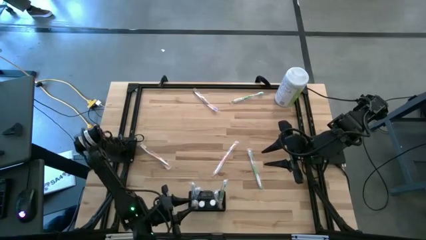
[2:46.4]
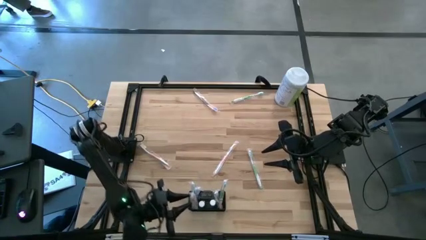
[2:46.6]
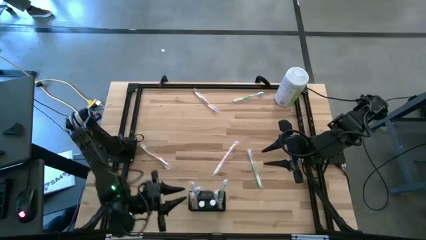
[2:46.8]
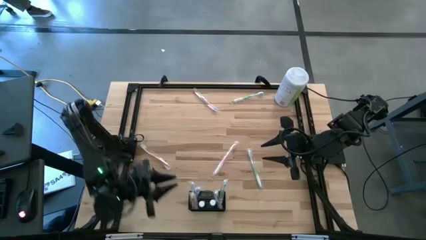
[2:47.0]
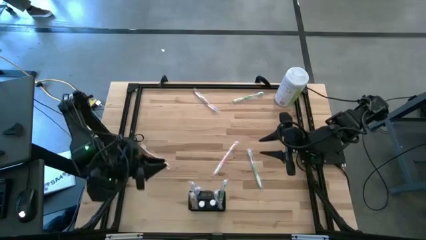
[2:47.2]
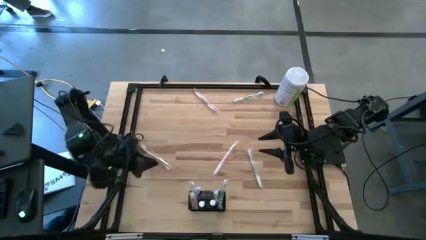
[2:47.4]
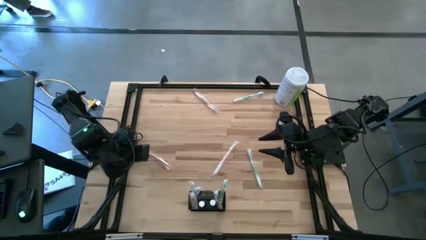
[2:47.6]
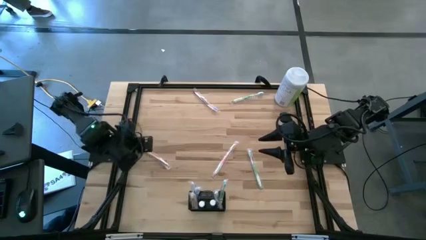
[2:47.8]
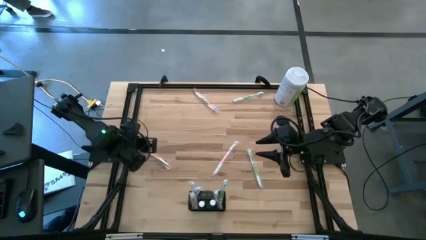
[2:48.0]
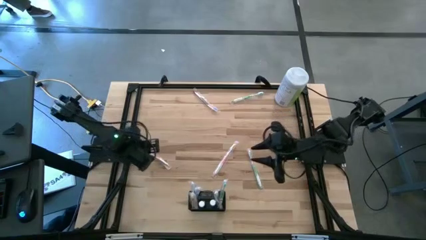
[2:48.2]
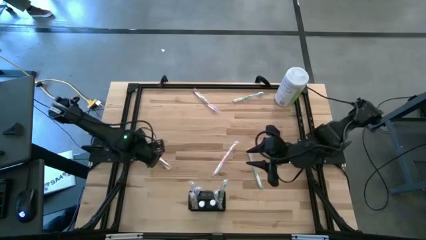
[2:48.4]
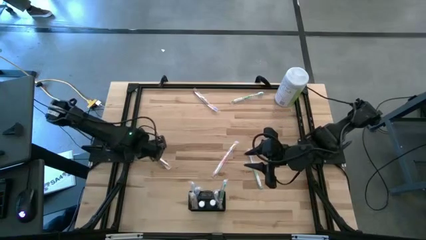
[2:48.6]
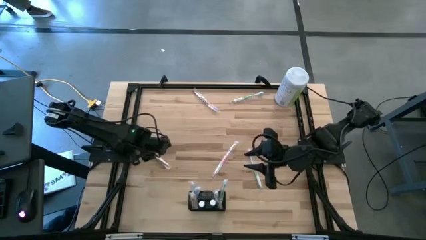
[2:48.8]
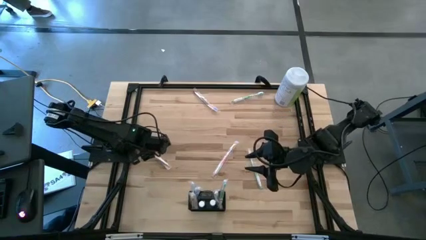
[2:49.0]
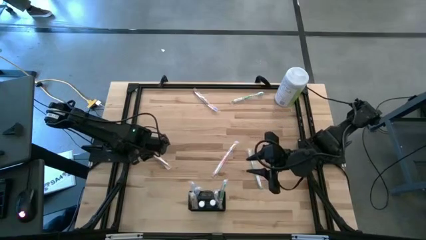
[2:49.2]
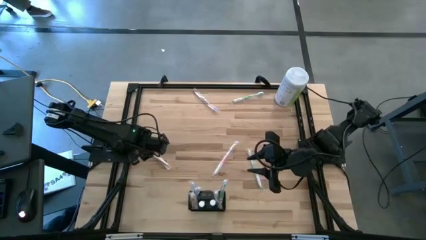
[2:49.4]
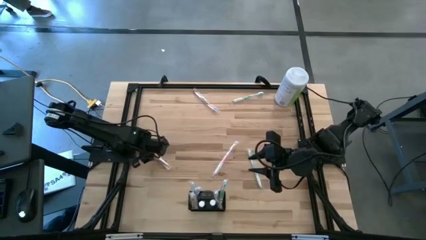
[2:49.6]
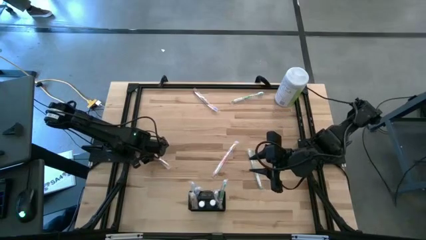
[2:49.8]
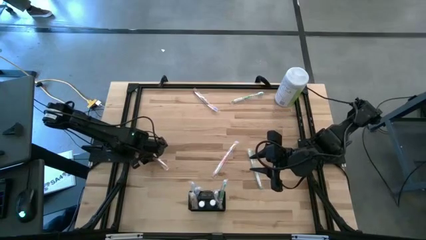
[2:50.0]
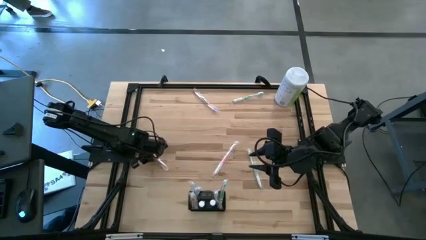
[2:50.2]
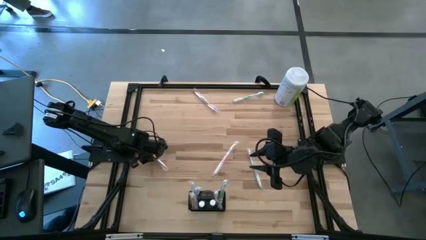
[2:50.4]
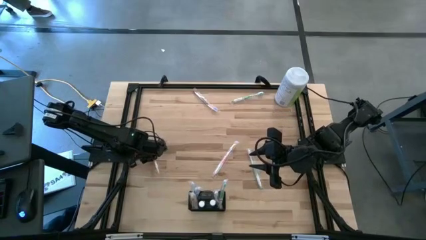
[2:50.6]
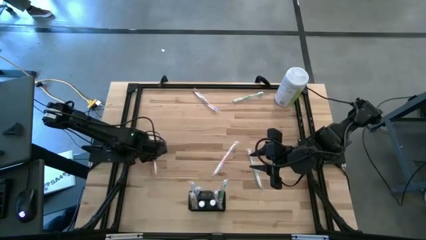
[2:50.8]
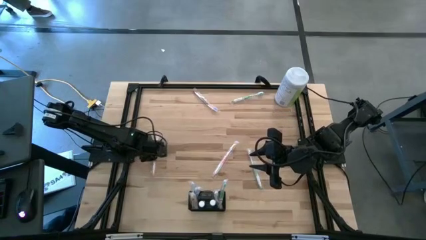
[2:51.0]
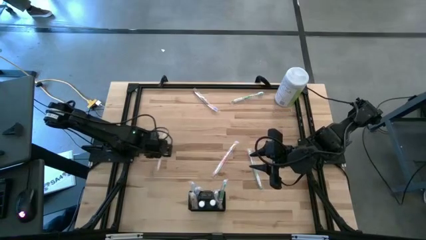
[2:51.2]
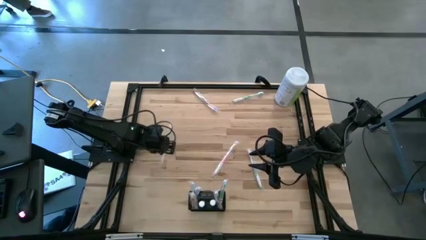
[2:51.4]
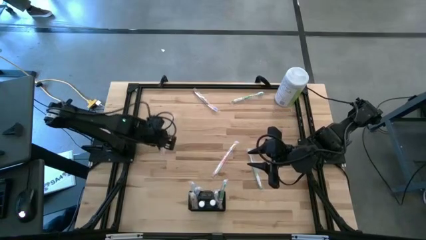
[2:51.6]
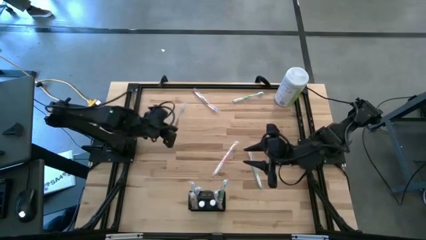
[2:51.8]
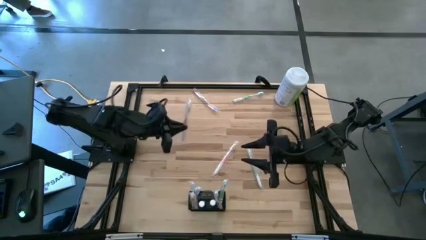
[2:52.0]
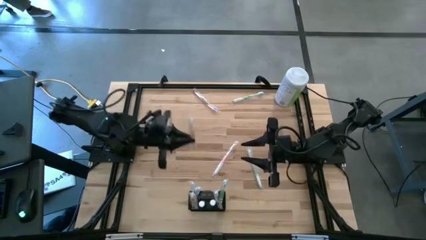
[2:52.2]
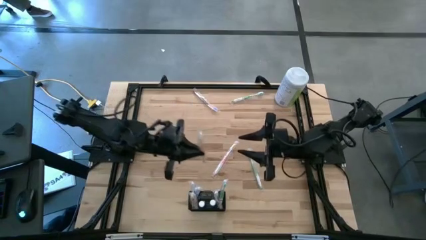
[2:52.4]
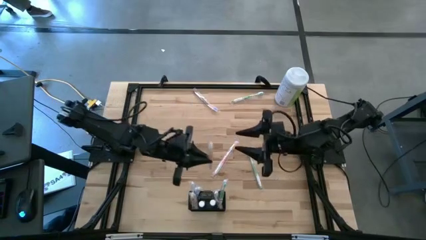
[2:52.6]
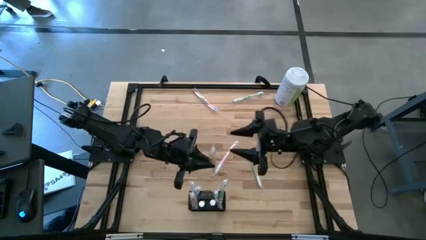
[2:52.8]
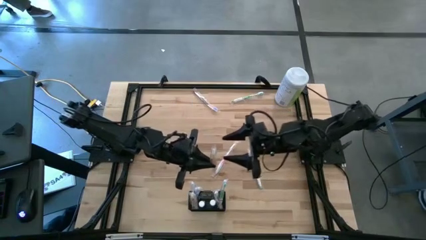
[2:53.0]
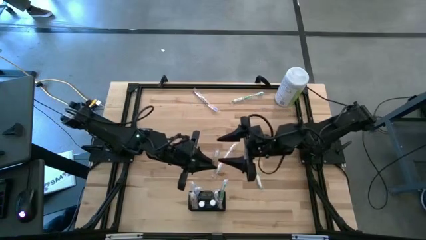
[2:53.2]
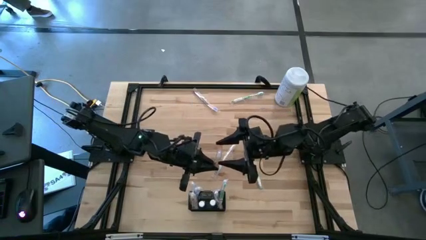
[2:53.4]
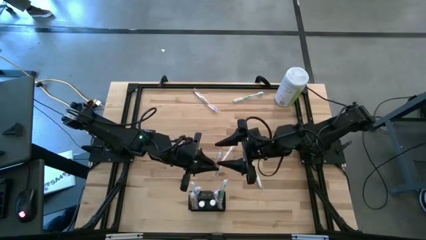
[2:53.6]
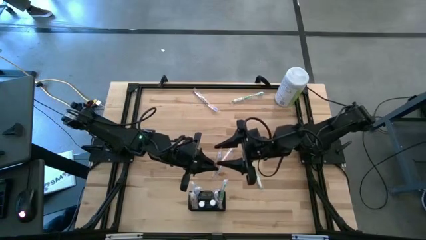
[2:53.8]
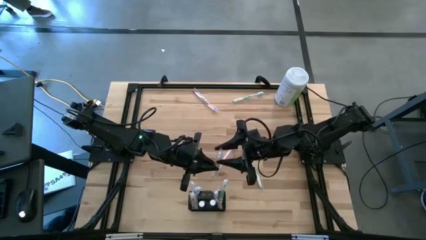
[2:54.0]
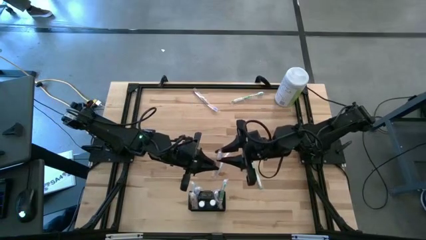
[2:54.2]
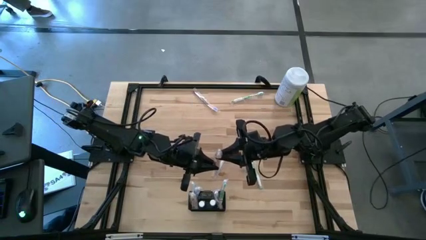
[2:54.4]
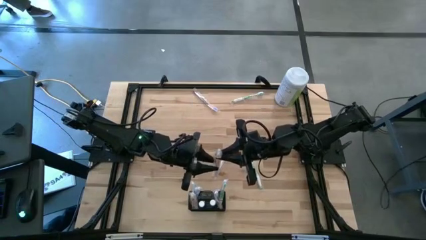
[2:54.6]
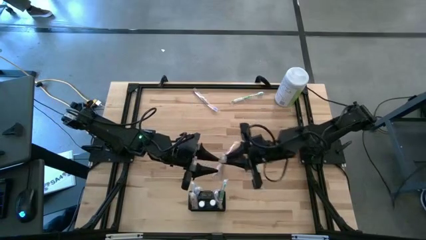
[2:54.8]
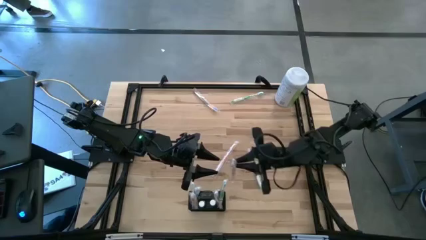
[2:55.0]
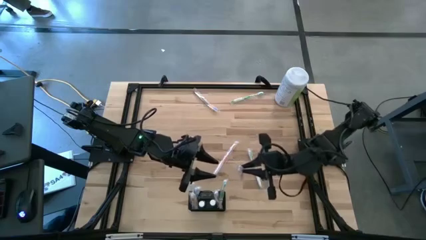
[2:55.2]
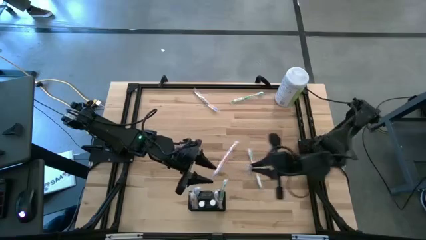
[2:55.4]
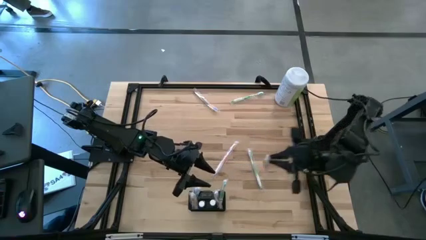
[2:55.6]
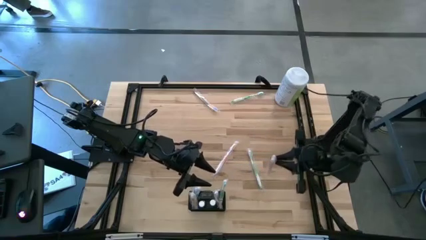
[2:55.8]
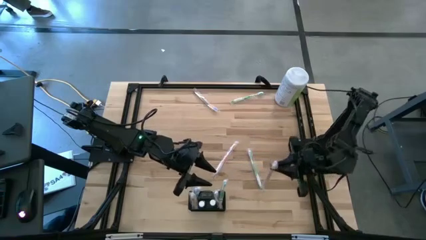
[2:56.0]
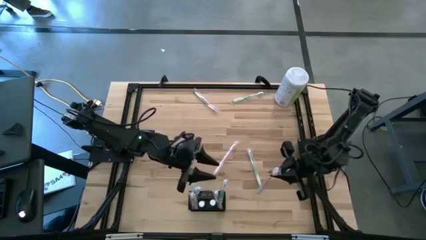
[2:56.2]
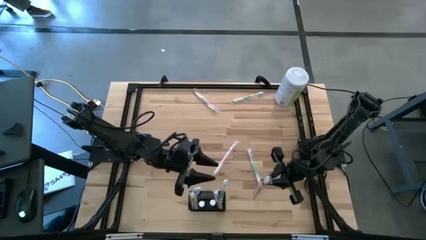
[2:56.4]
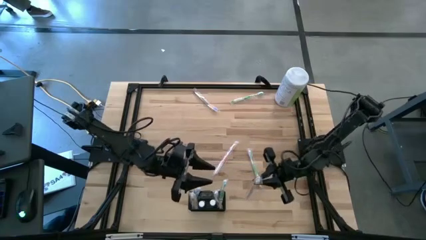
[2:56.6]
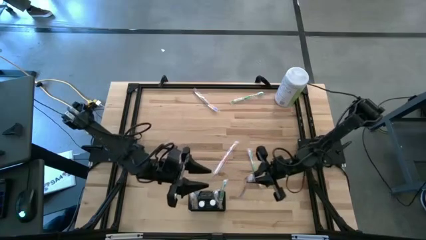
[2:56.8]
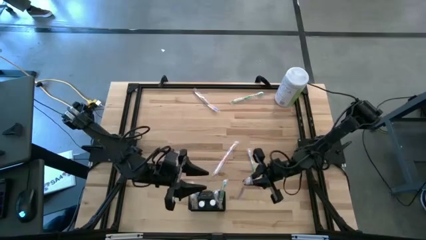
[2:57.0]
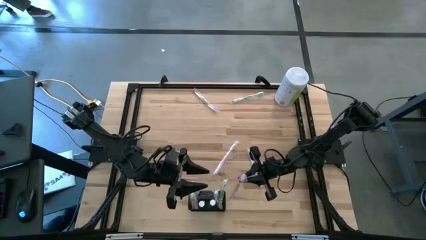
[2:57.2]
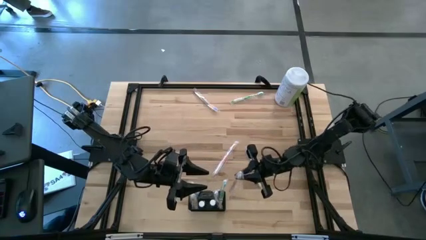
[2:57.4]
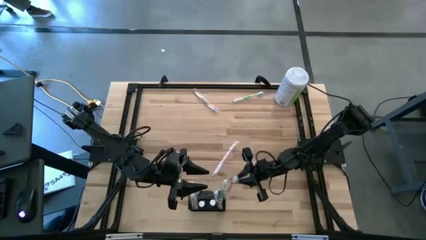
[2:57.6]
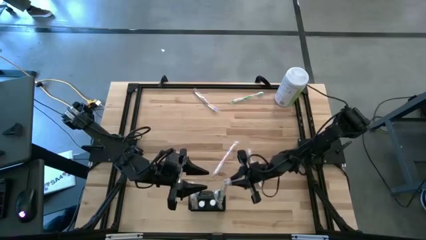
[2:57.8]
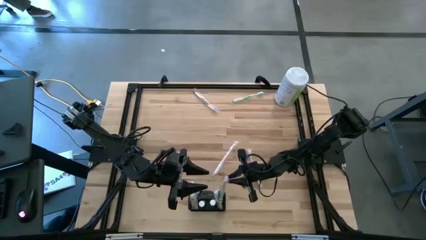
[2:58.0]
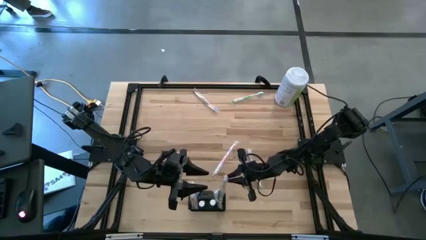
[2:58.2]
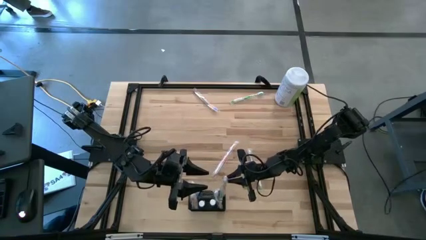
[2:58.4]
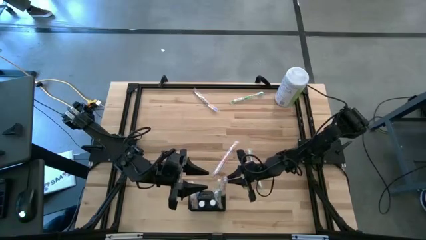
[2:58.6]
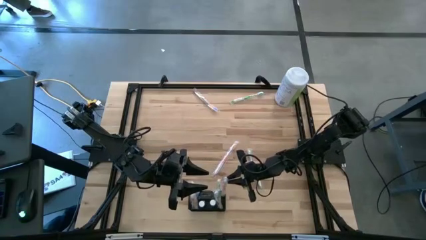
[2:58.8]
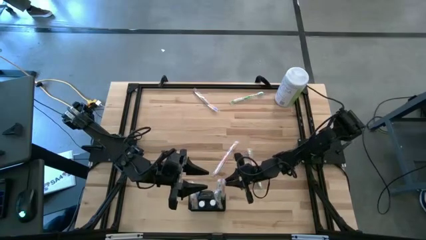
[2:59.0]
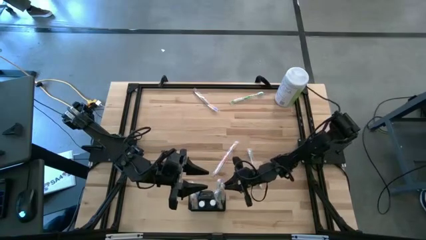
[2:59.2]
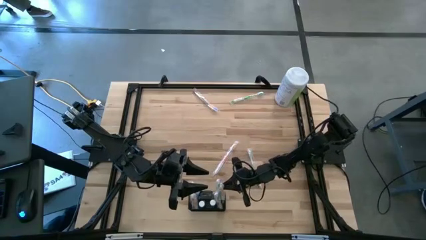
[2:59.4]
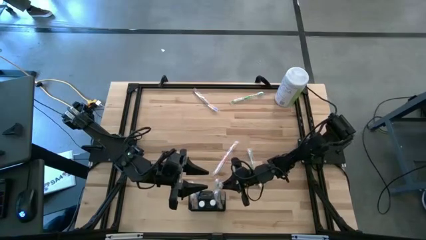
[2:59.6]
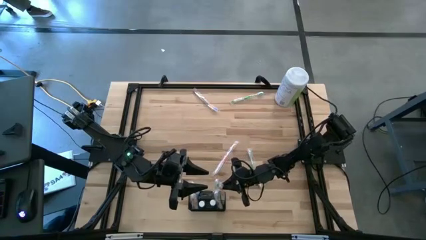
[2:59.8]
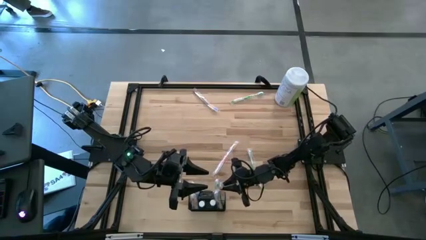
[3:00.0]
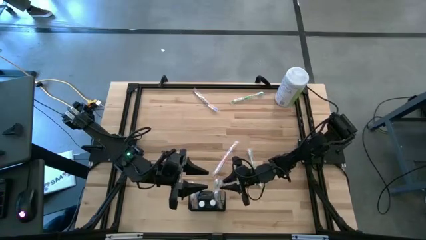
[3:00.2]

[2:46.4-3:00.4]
Task: Pick & Place toothbrushing station
Put the left orange toothbrush into the black wire organizer

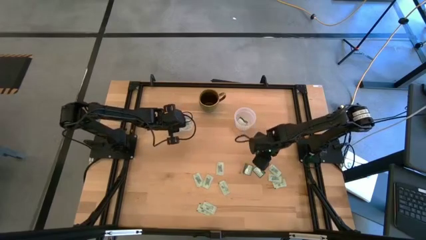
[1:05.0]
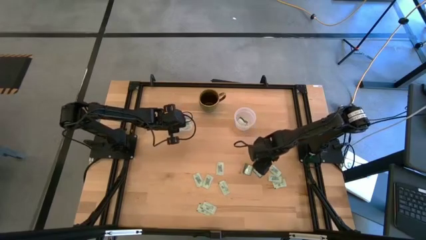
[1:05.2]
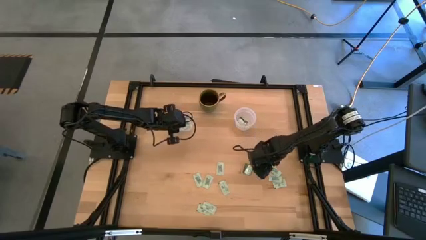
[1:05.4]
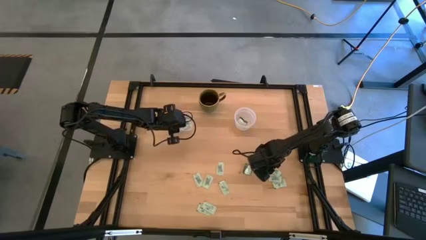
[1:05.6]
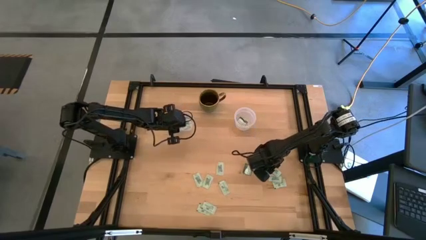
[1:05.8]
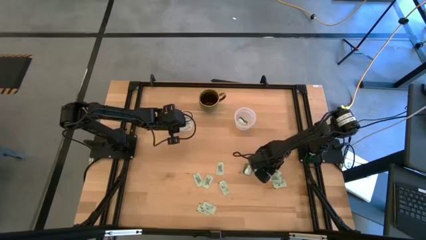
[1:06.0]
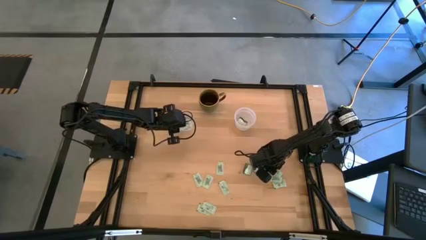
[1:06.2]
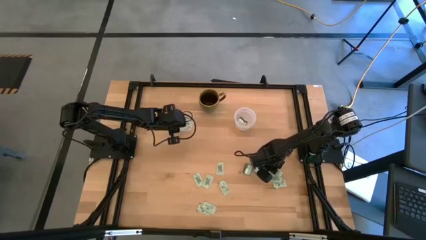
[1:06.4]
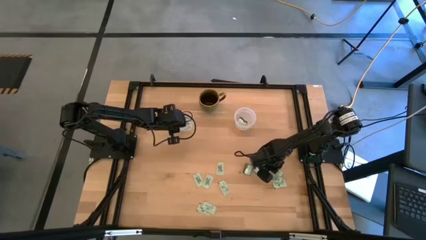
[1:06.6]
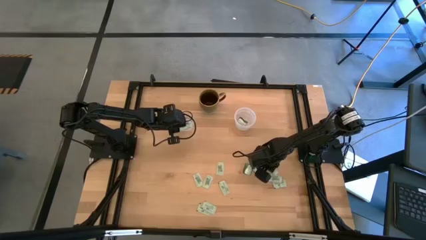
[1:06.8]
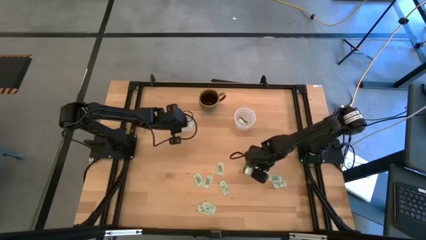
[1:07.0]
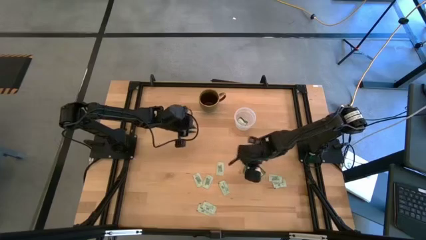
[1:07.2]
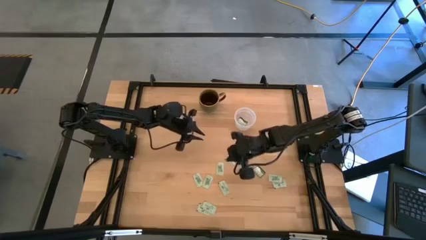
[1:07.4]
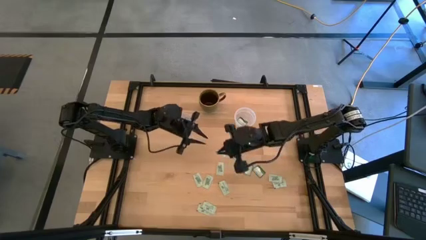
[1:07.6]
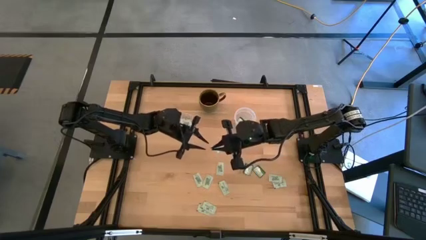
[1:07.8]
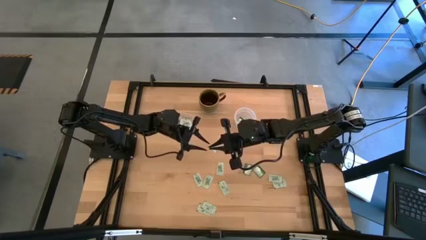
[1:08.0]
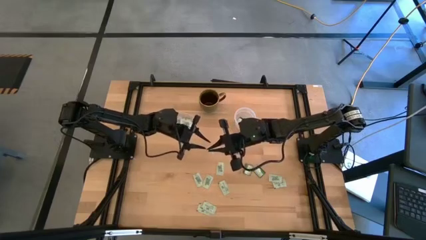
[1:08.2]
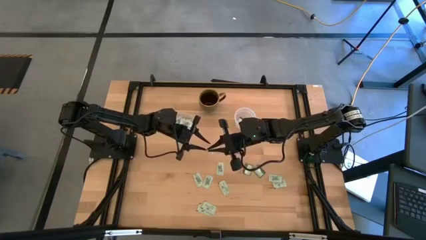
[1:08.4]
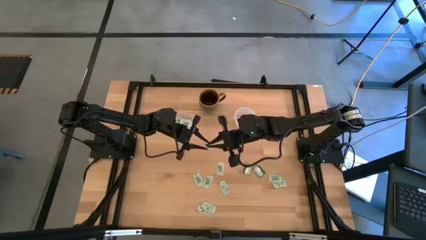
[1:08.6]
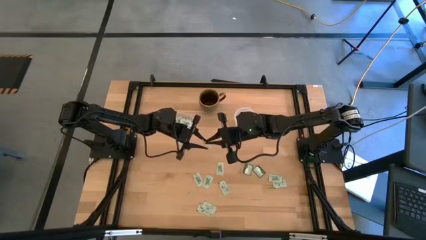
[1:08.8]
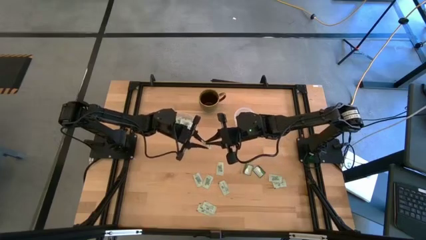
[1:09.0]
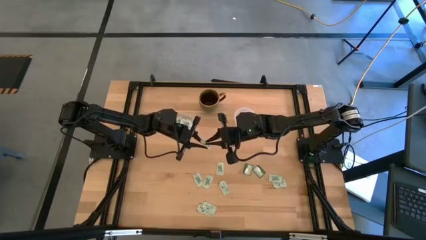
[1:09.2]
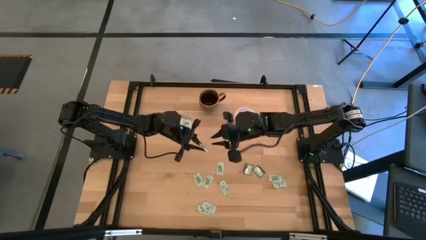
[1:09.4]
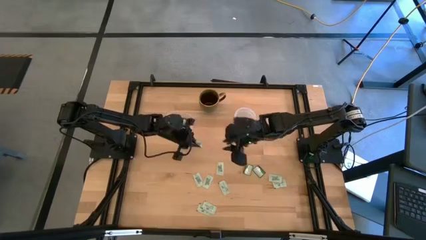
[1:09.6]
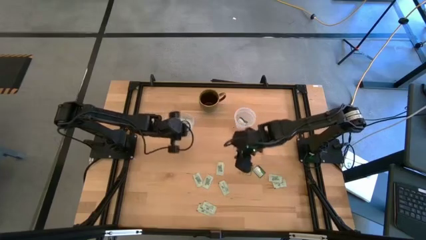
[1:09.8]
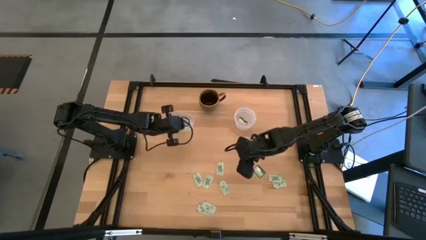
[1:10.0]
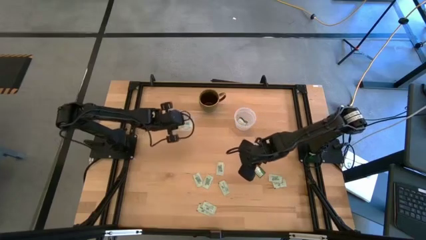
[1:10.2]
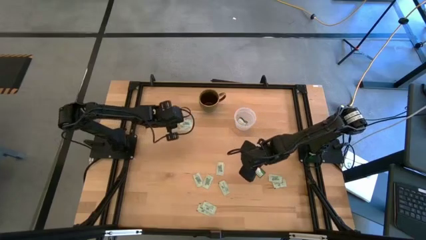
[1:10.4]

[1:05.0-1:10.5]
Task: Pick and place Stevia / Truvia into bins
Put the light green stevia packet into the left transparent container
